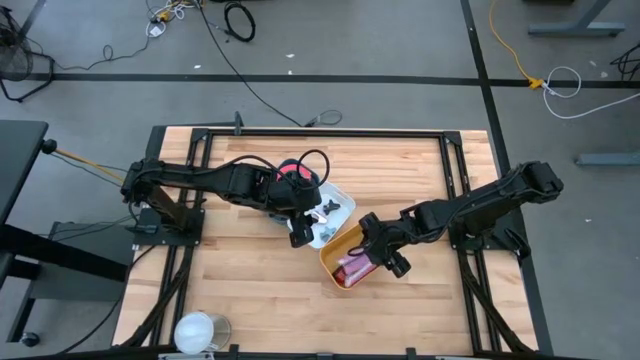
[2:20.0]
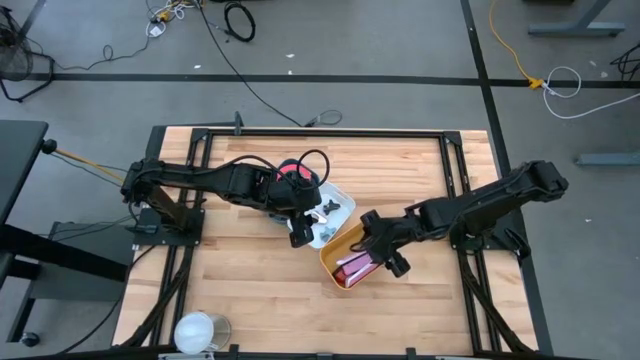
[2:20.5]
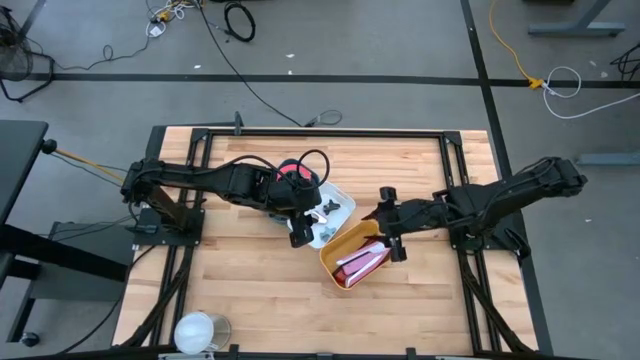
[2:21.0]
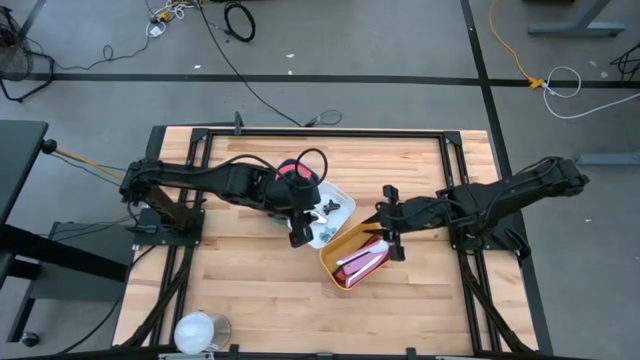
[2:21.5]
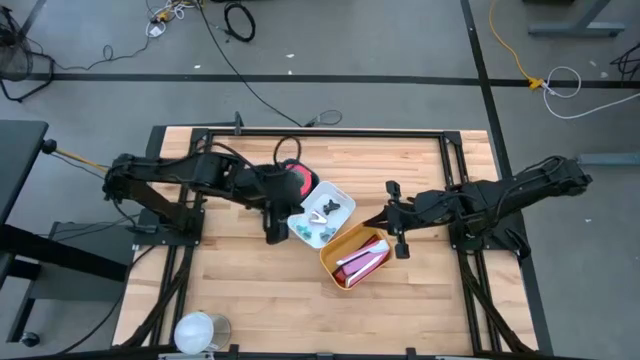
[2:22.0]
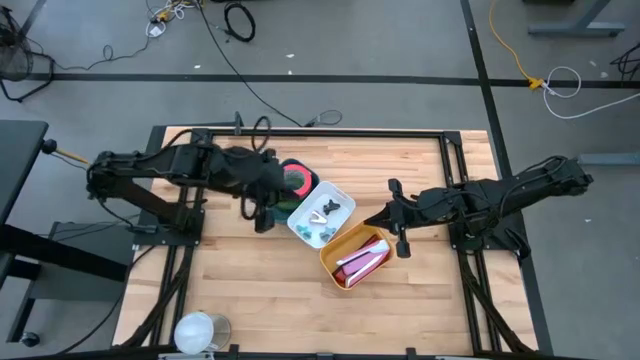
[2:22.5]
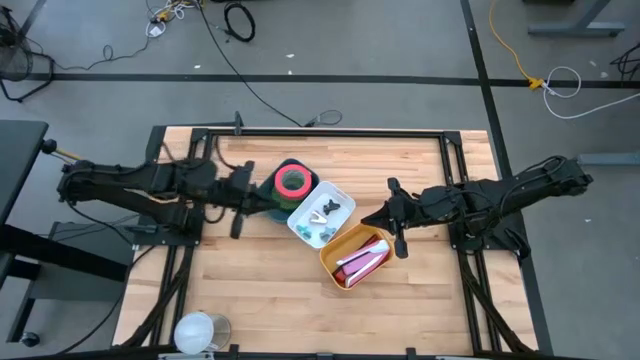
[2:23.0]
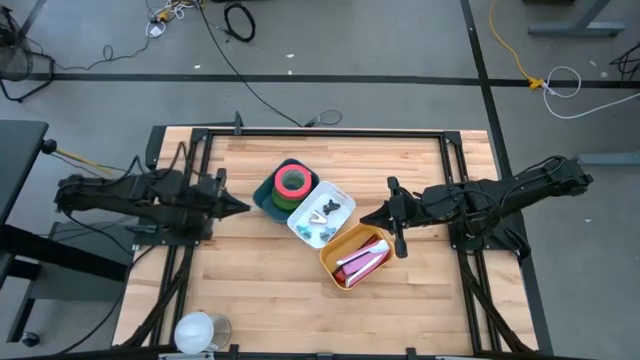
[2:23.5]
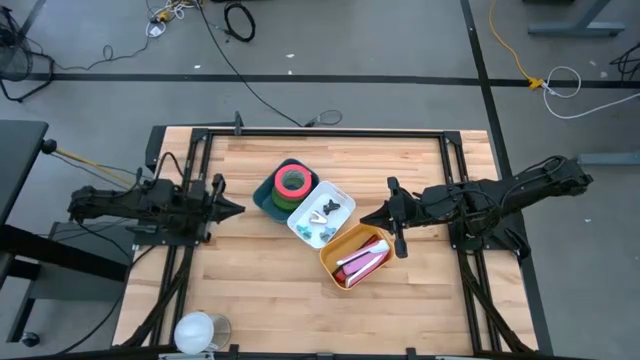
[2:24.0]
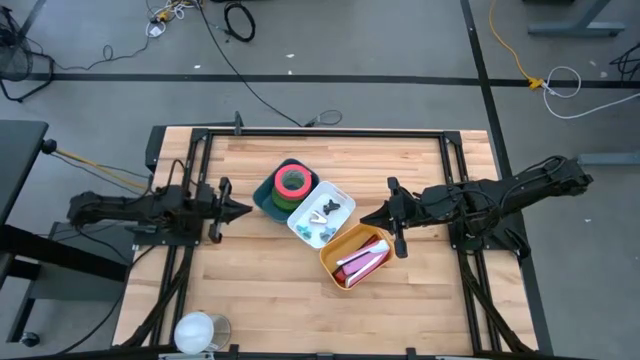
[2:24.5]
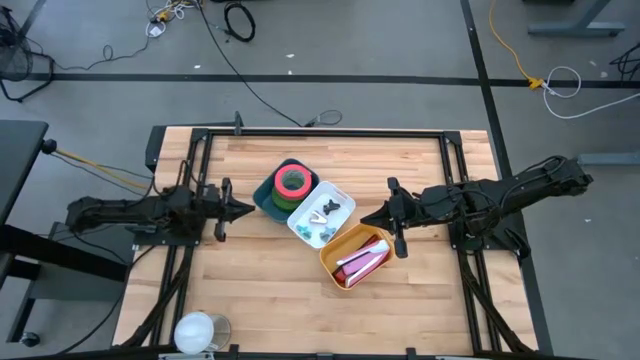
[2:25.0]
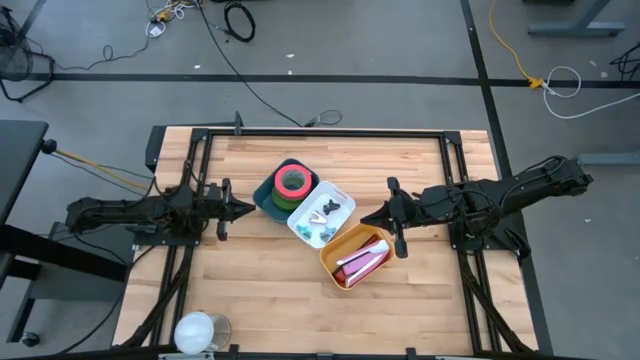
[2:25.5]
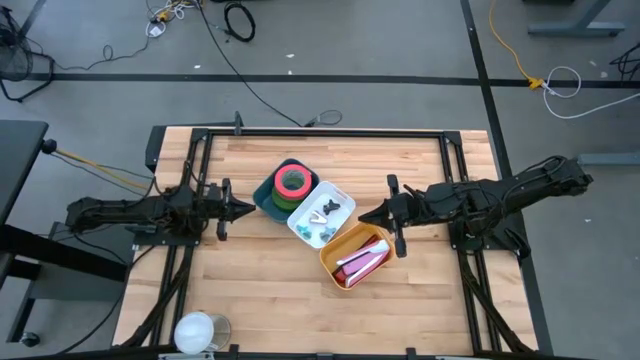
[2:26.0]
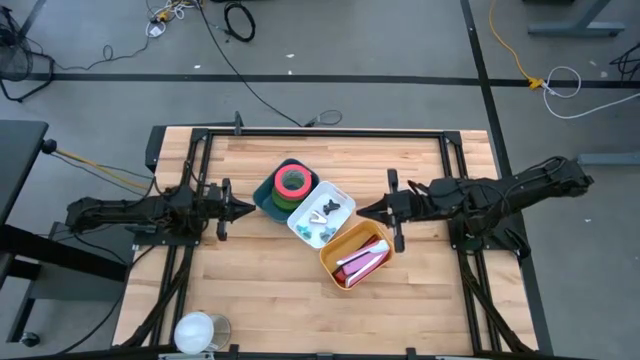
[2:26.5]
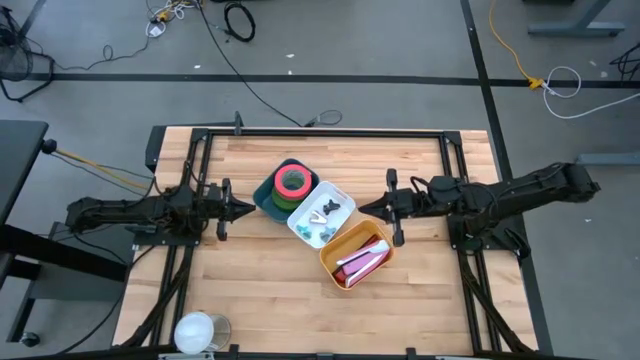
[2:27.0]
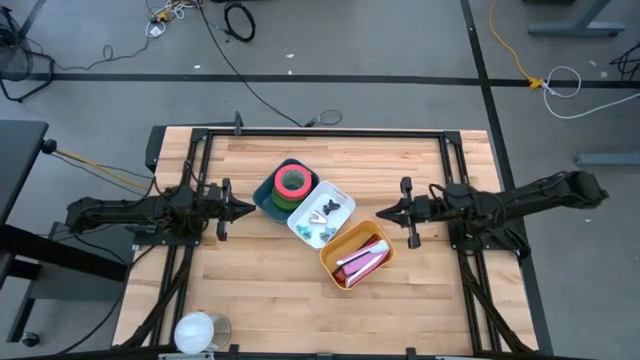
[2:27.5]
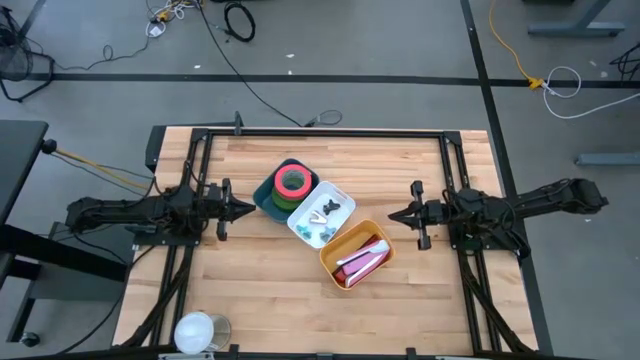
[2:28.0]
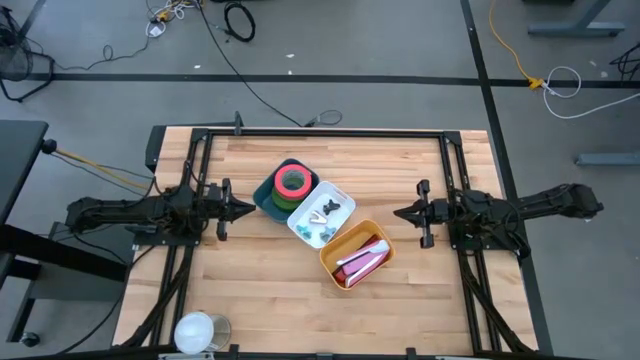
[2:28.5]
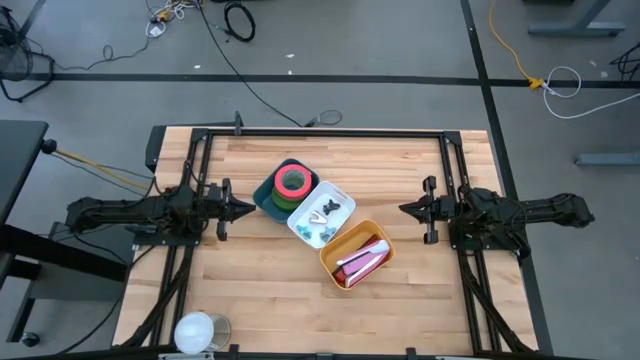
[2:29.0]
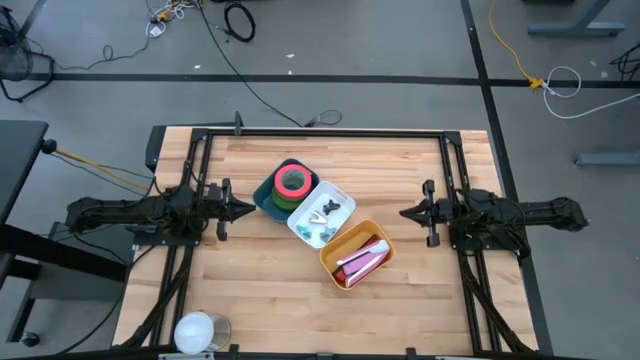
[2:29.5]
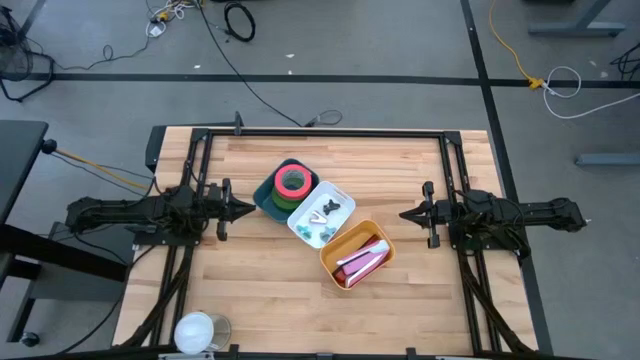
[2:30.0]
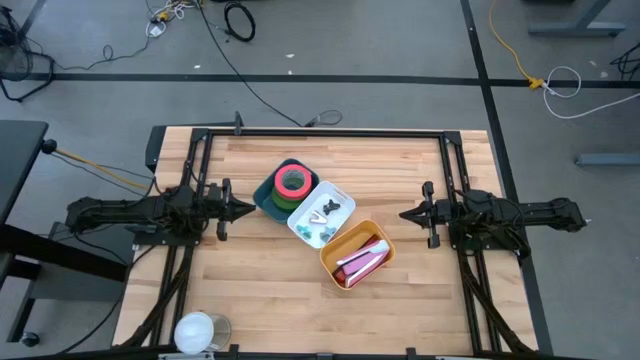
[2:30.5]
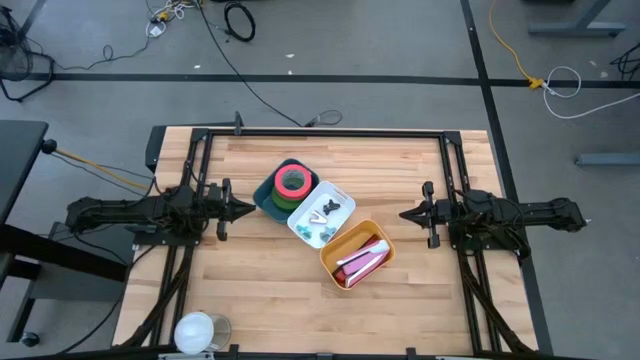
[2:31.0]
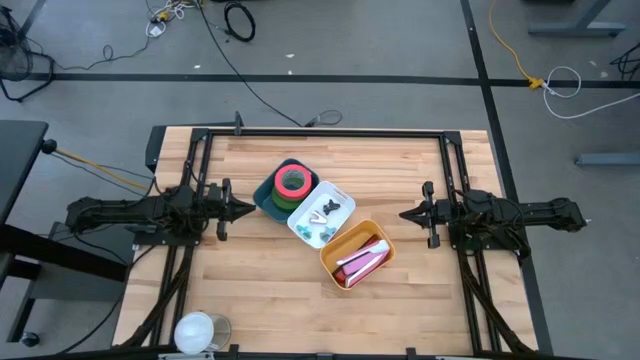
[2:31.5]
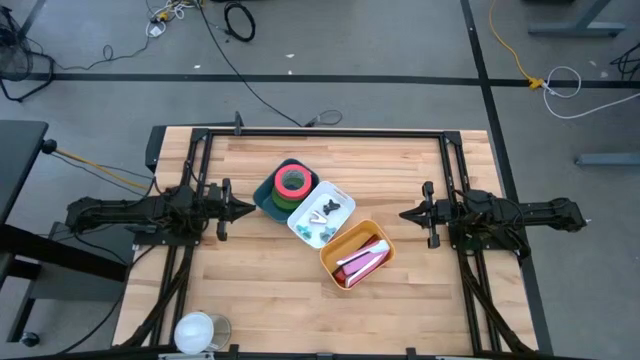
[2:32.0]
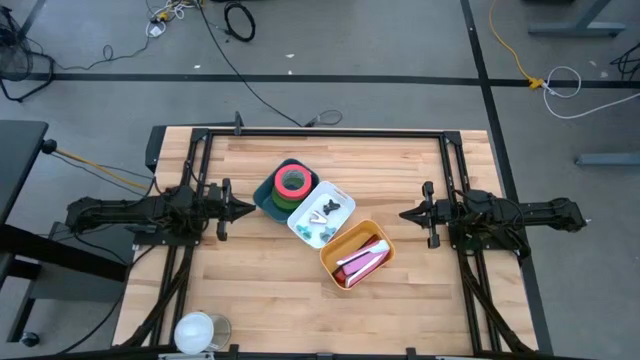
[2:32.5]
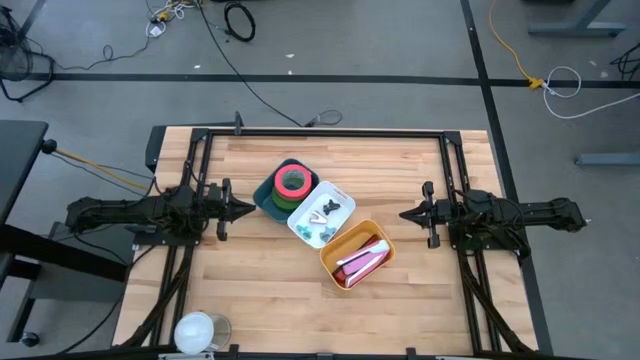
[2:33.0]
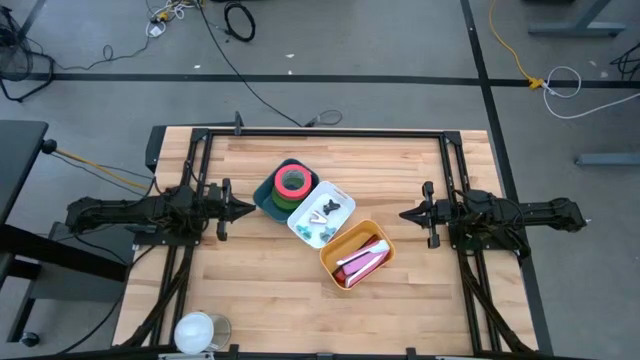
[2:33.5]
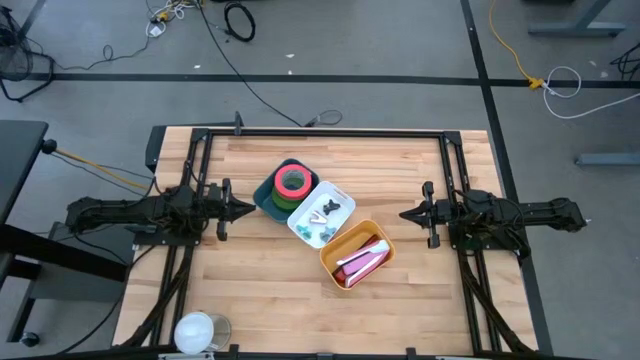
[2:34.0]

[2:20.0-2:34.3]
Task: Pick and place Stapler, Stapler remover, tape
Return to Home Position

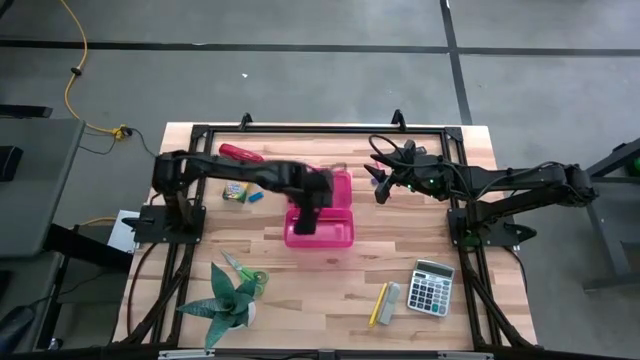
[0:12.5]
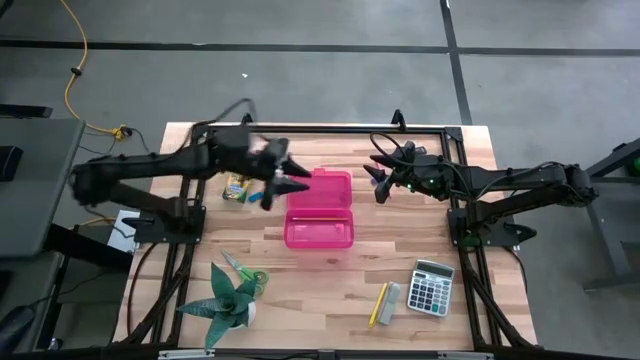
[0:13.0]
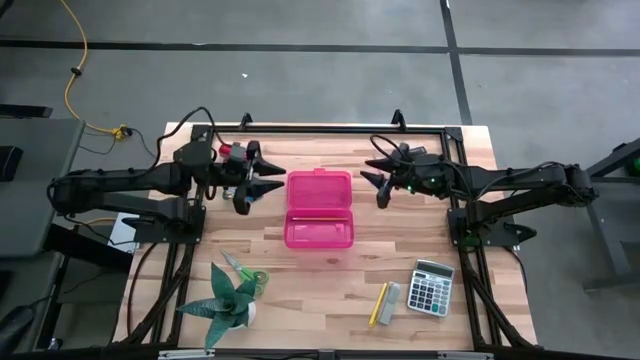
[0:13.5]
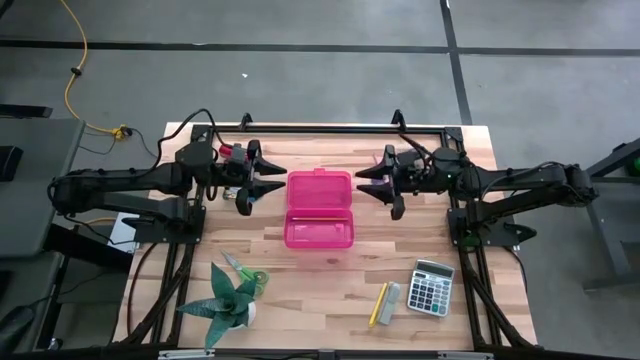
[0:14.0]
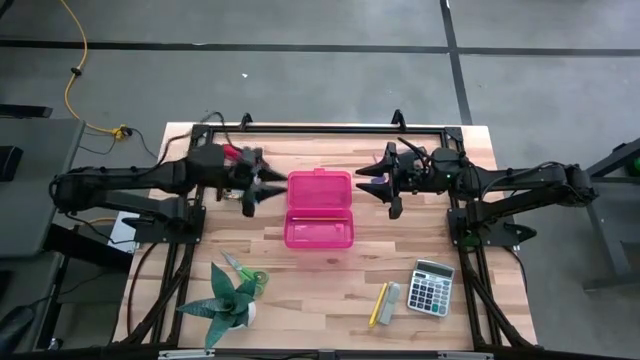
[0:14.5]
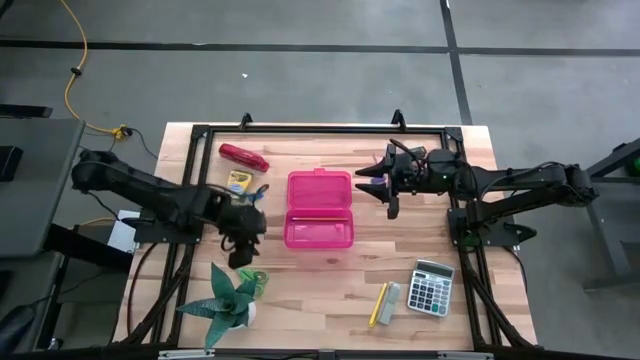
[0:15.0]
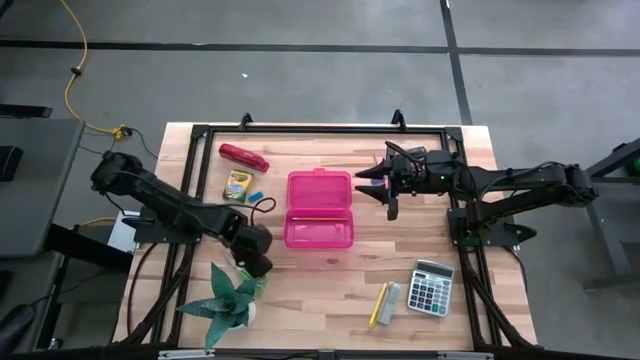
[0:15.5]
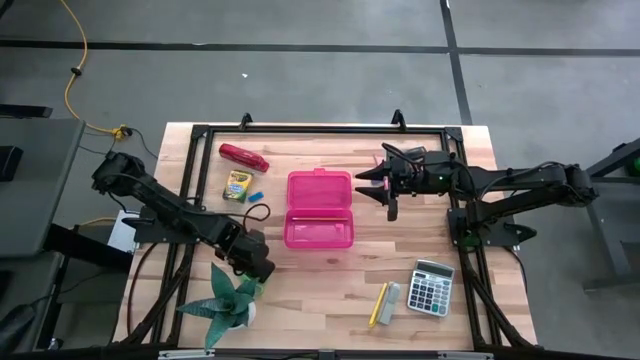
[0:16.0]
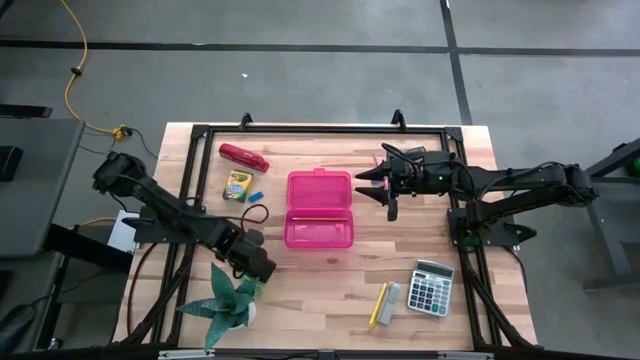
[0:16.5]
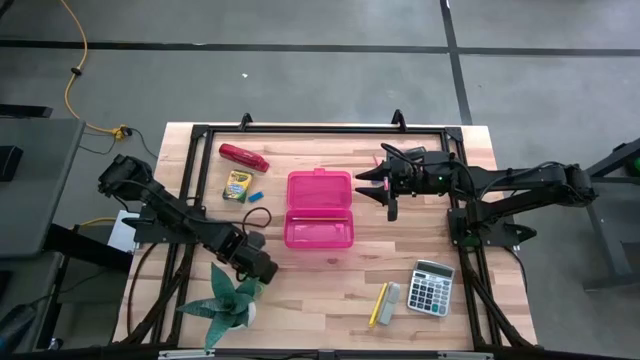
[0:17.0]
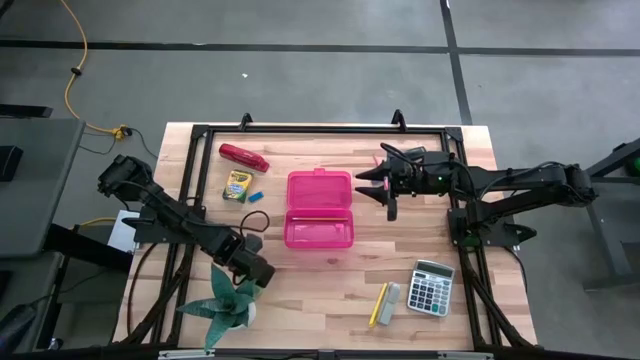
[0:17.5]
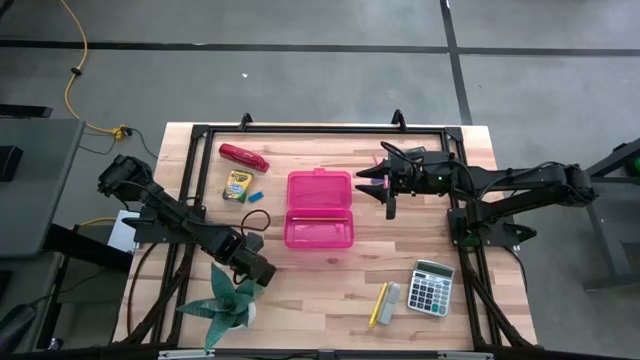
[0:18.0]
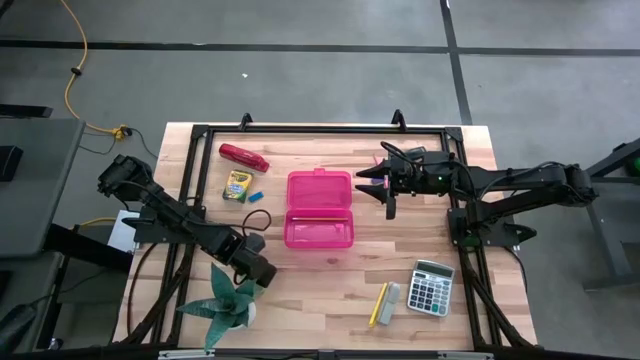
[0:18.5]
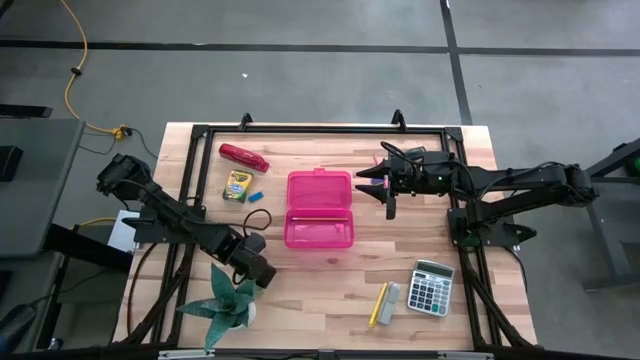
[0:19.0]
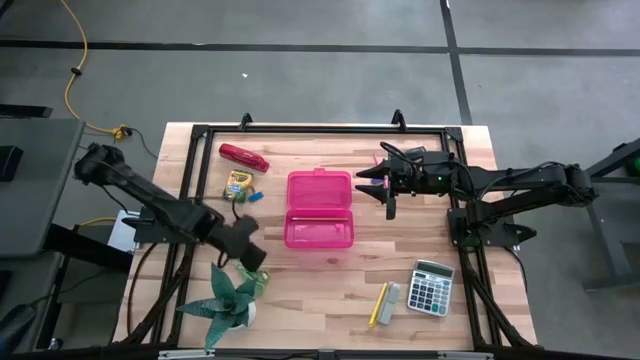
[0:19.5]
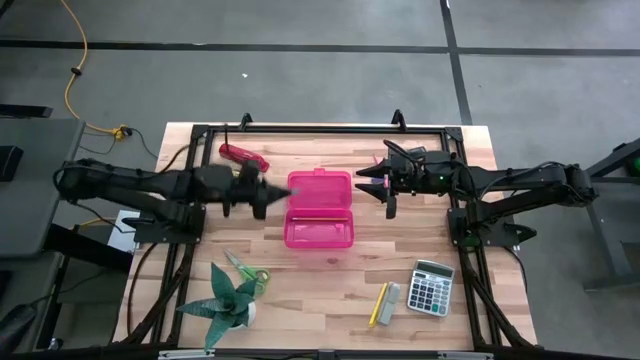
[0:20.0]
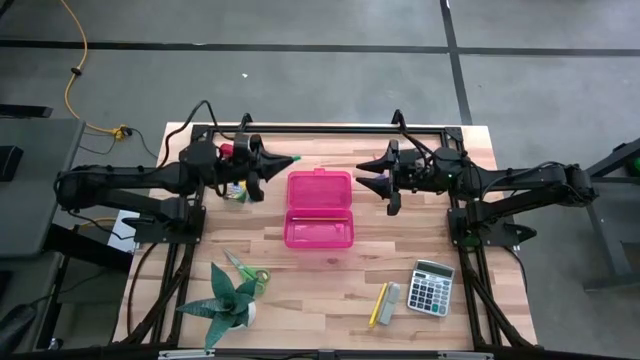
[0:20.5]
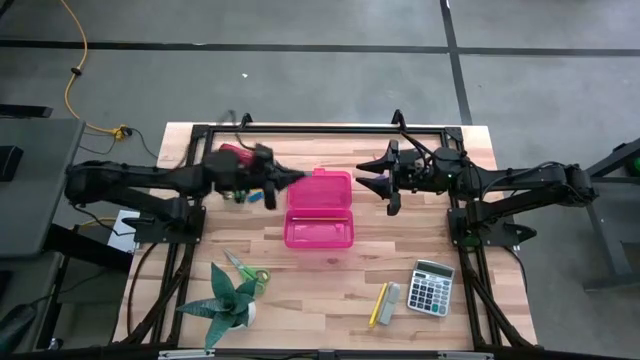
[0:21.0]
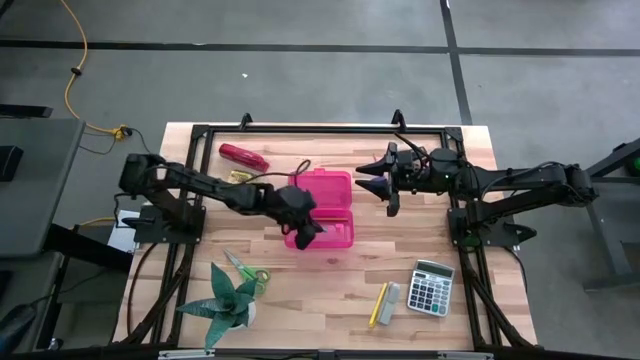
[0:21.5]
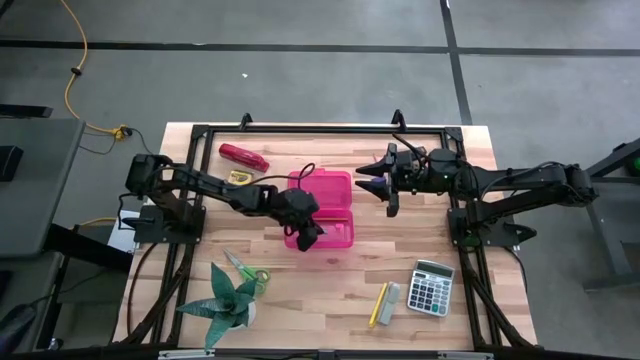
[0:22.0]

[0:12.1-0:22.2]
Task: Pack school essentials
Put the green eraser into the pink supply box
